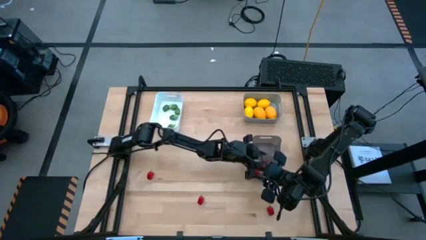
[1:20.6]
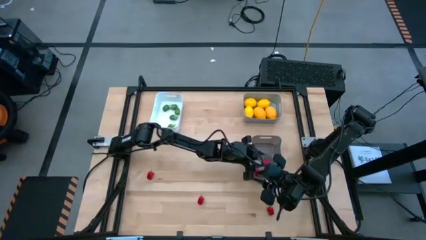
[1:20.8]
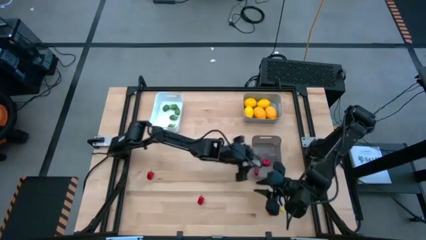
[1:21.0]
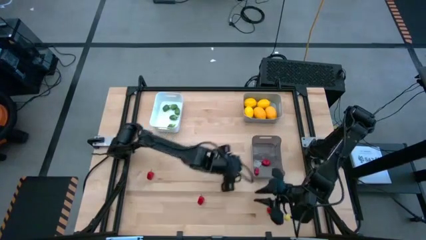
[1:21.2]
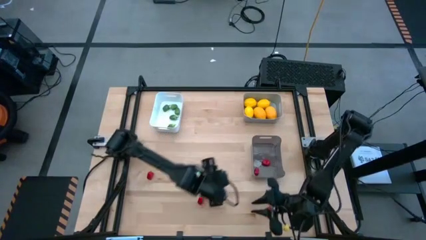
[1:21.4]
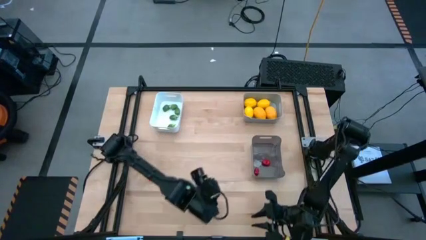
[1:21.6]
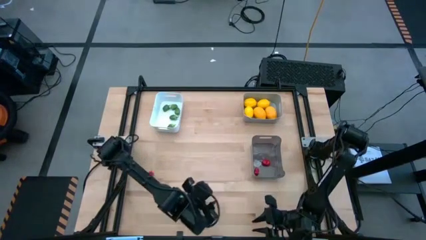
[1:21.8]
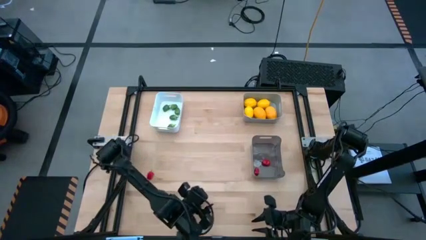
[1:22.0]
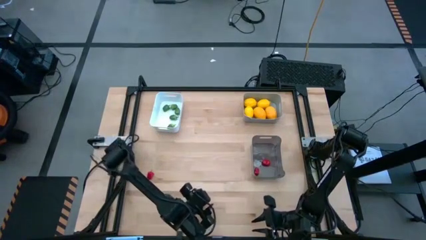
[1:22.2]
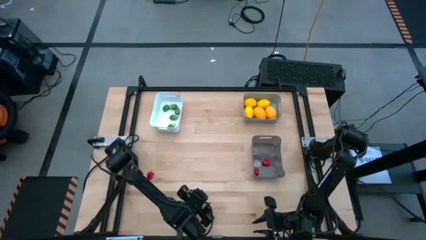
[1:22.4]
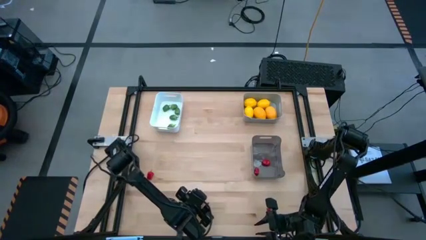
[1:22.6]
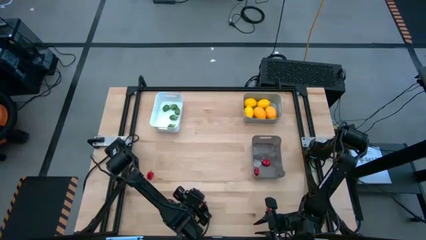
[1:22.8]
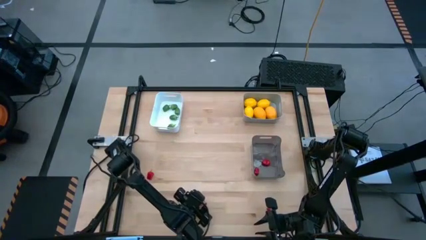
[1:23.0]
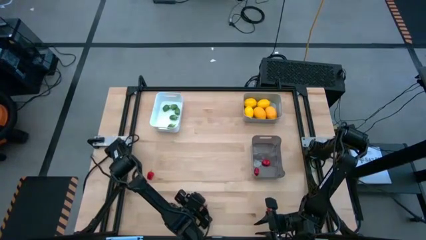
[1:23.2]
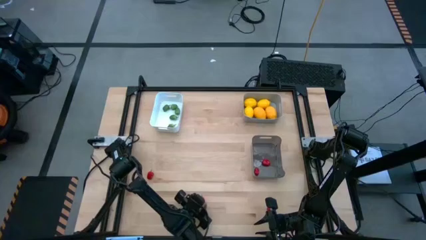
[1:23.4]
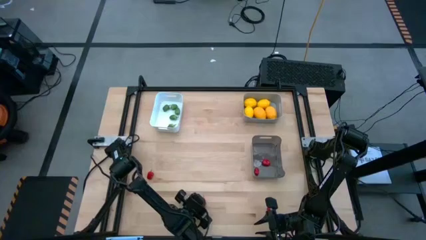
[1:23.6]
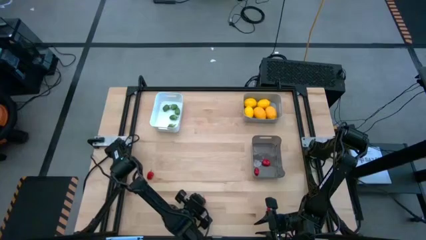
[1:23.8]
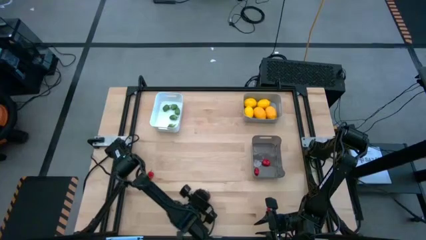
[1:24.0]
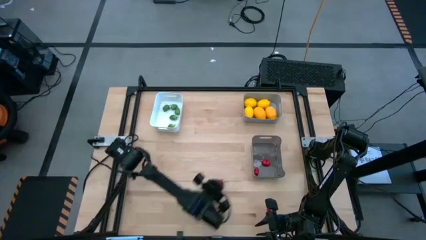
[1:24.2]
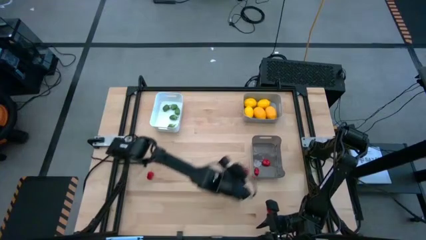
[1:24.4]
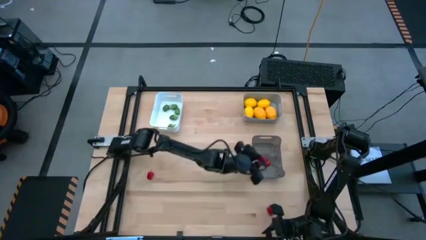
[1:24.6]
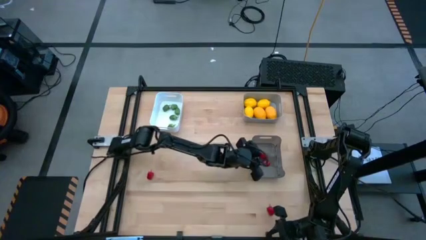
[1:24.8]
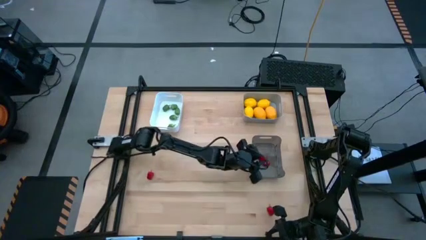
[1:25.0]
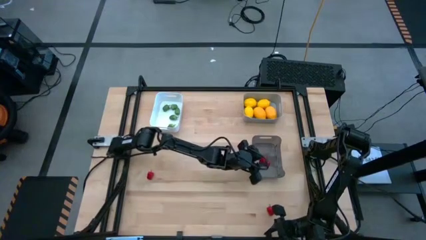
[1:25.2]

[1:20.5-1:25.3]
Task: Sort produce into baskets
Put the red chili pepper into the black bin

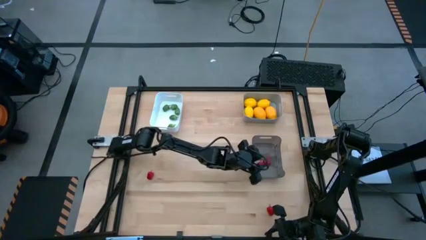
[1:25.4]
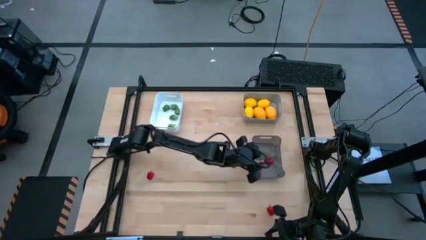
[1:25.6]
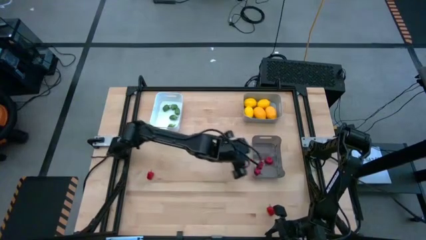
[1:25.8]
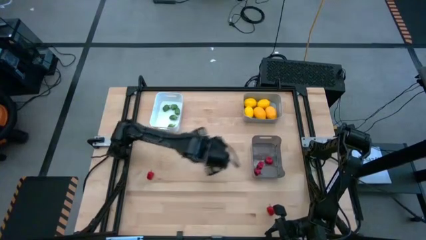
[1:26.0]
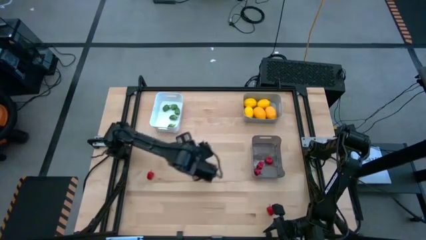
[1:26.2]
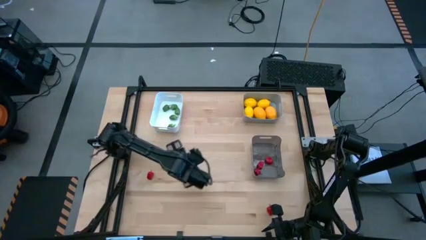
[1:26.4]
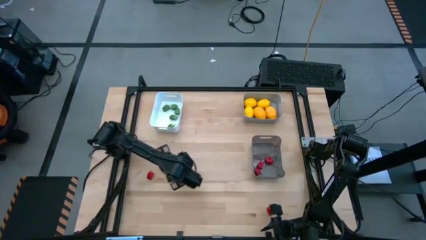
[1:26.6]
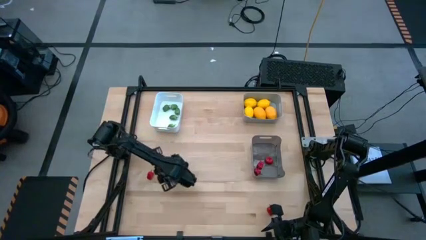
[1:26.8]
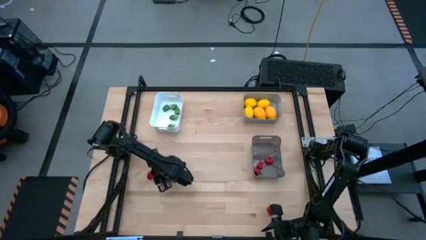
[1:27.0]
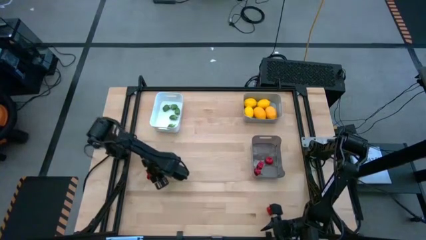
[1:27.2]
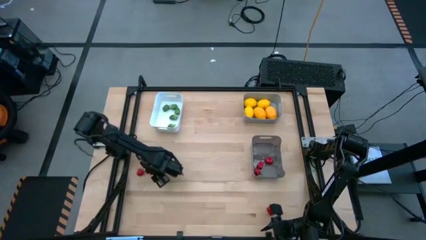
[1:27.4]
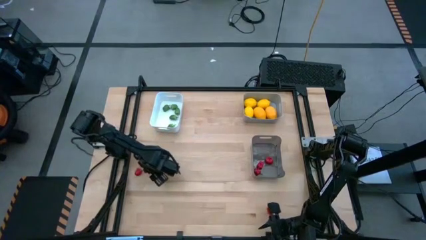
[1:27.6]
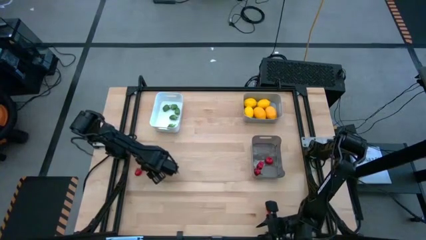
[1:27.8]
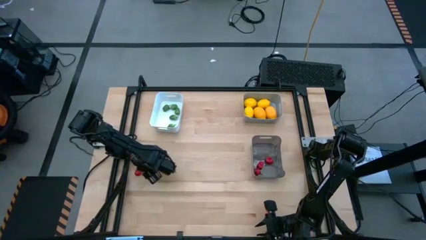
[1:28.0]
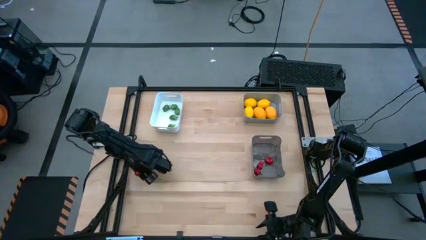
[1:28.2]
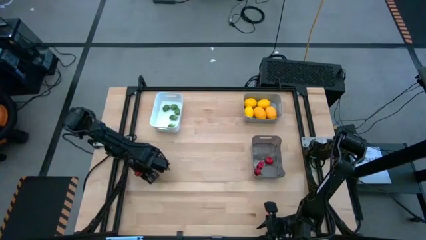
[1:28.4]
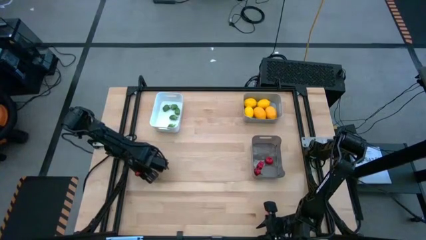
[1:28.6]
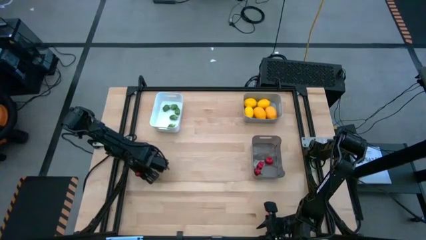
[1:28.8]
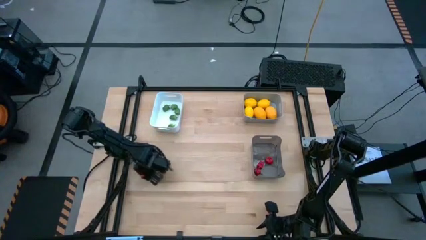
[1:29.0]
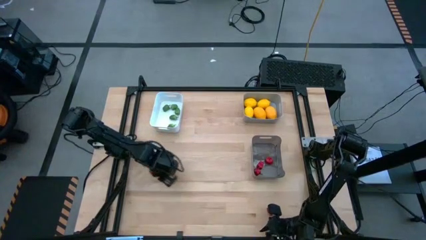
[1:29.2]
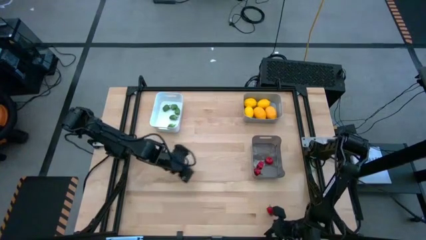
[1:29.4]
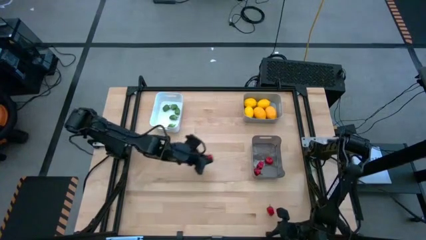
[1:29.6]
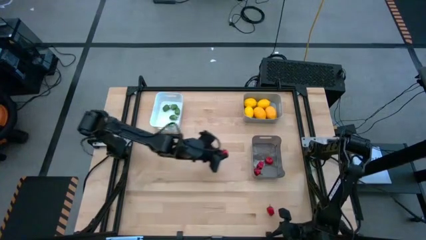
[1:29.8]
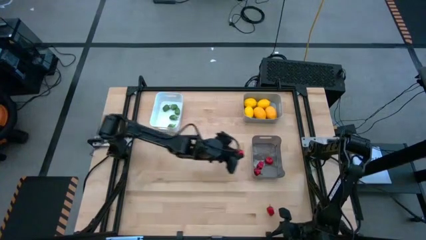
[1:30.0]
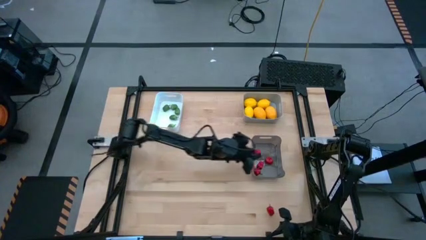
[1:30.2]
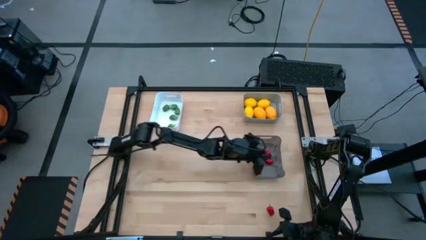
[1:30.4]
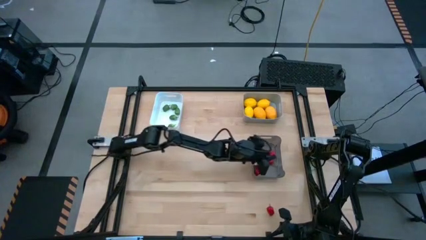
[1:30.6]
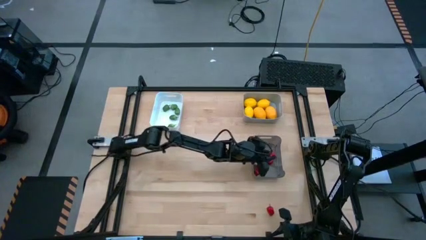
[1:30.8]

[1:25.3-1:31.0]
Put the red chili pepper into the black bin

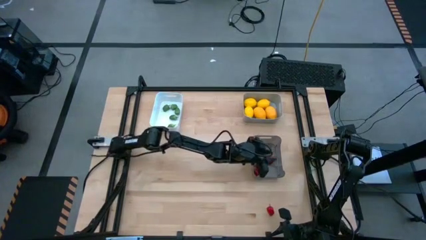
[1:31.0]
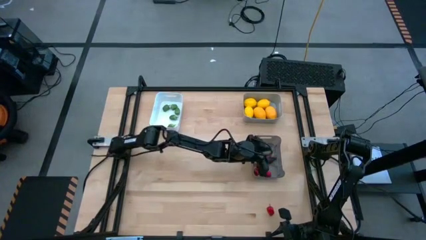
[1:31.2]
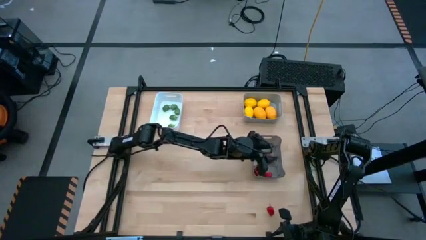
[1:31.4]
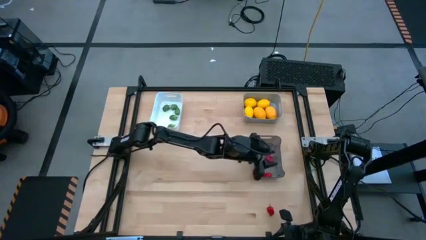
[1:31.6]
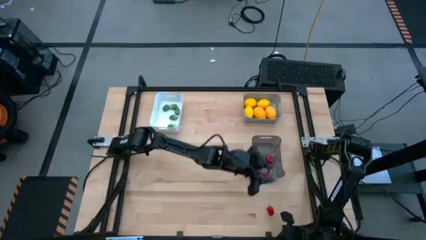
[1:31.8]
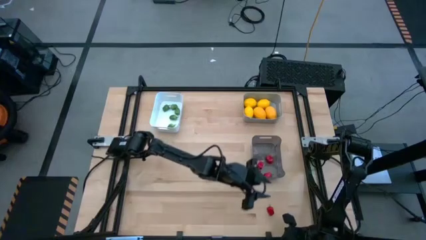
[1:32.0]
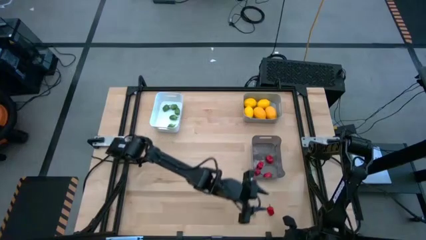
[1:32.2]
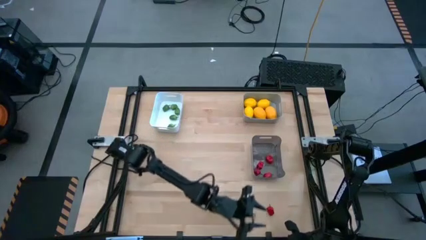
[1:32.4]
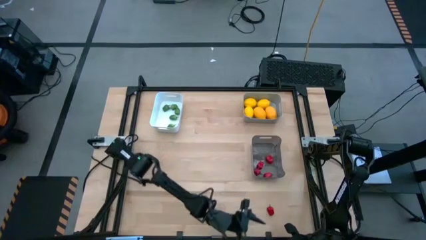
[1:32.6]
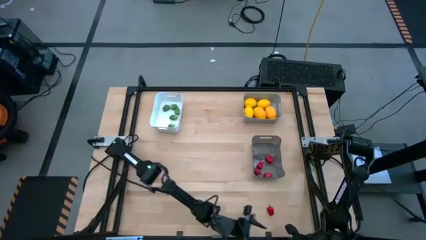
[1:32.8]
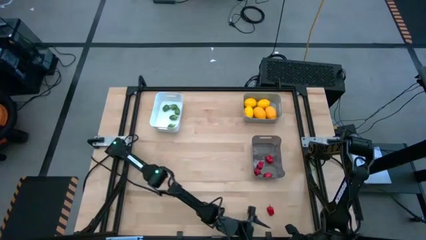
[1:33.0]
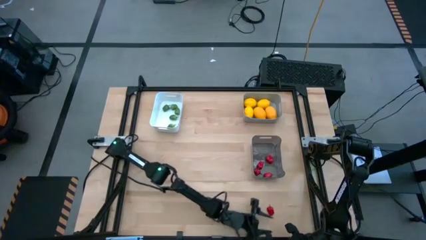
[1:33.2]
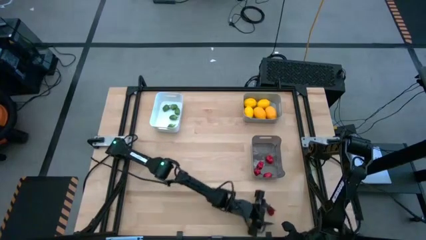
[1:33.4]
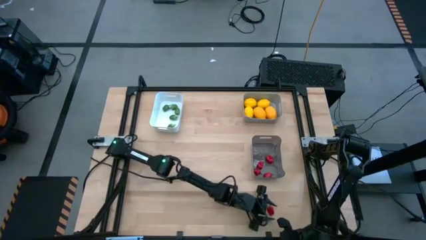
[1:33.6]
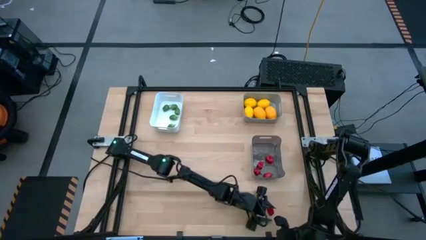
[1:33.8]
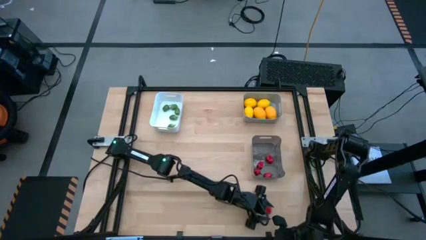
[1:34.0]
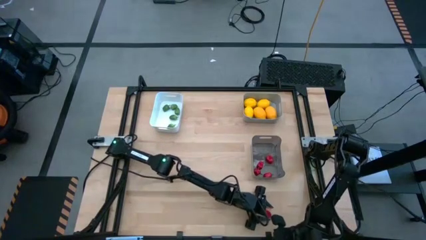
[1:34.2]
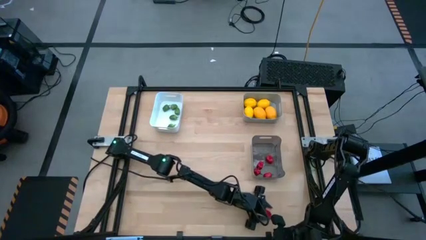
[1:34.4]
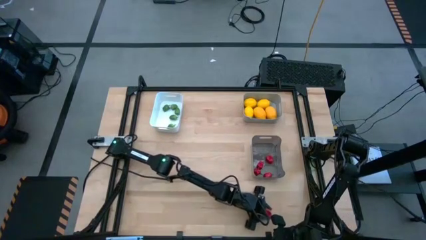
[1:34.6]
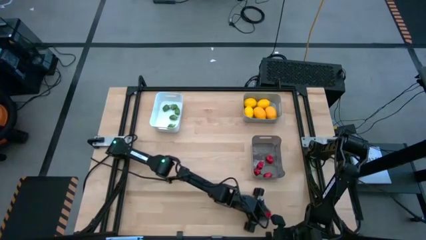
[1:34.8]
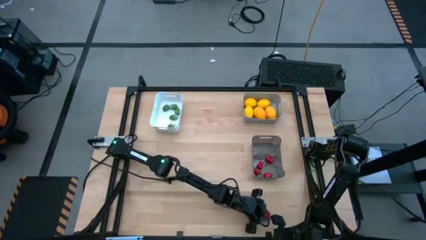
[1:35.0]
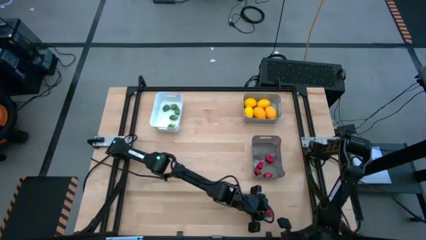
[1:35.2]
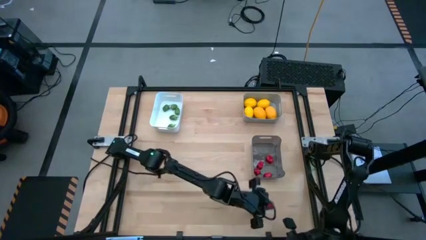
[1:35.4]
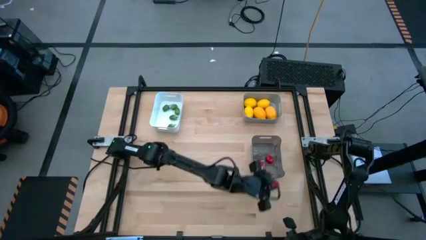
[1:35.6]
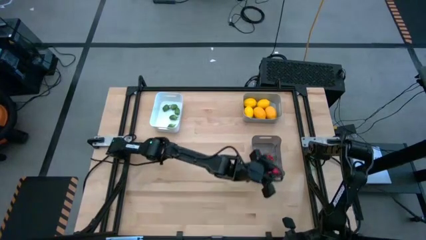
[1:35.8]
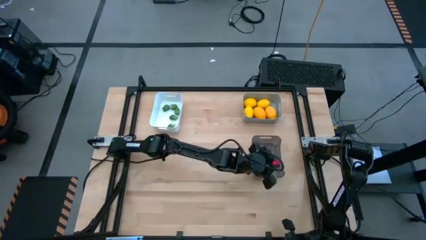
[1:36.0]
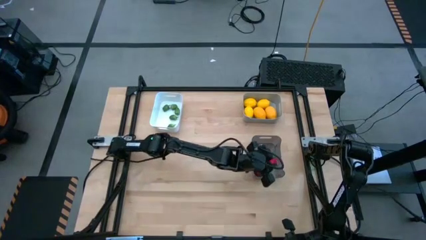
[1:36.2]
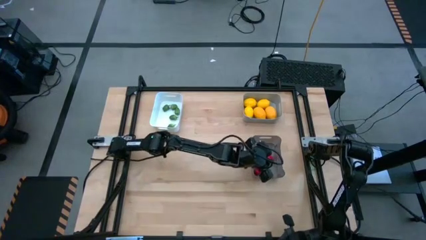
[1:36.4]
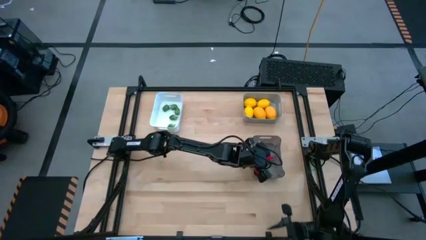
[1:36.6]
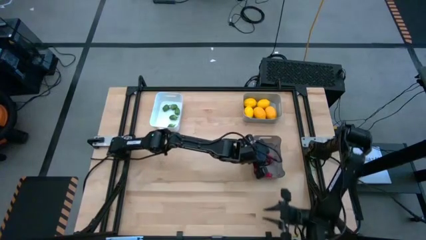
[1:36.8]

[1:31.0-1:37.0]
Put the red chili pepper into the black bin
